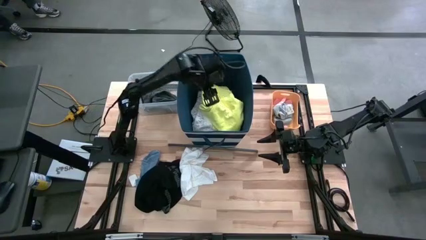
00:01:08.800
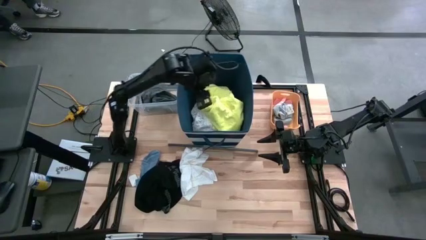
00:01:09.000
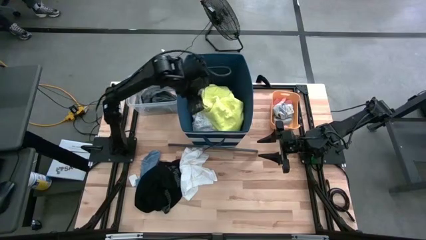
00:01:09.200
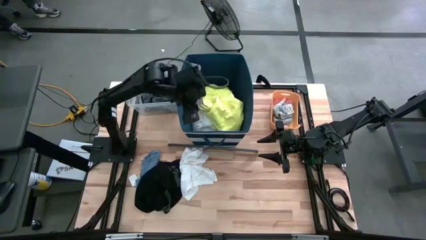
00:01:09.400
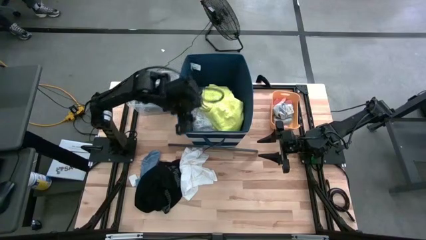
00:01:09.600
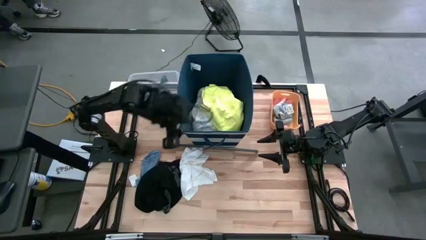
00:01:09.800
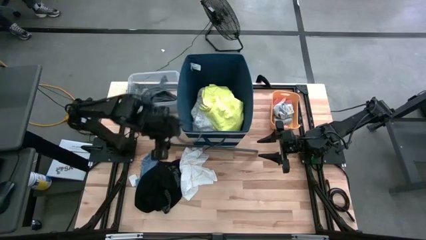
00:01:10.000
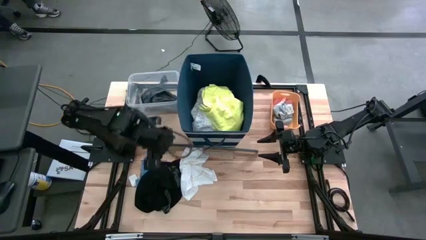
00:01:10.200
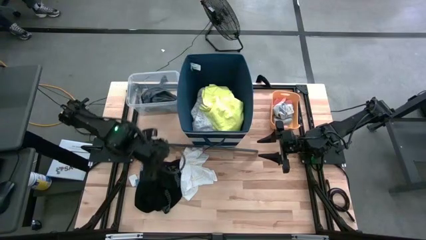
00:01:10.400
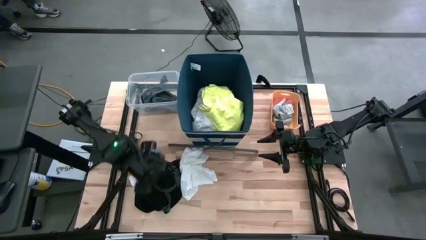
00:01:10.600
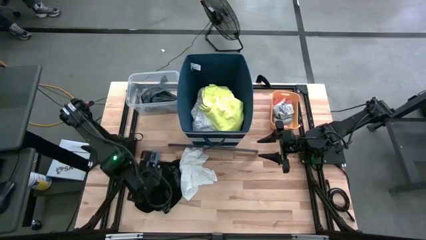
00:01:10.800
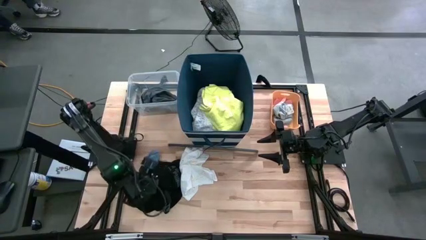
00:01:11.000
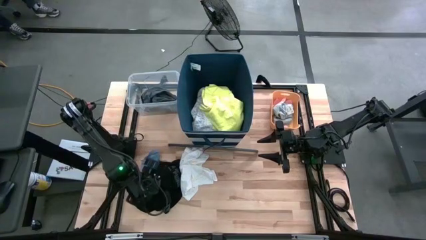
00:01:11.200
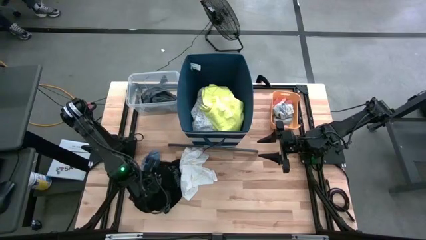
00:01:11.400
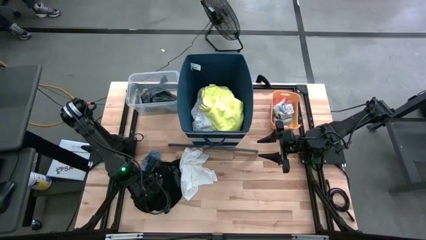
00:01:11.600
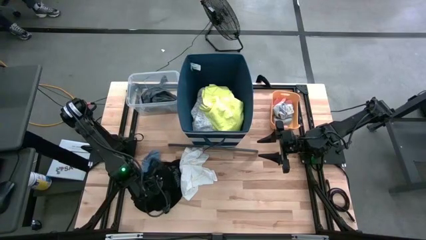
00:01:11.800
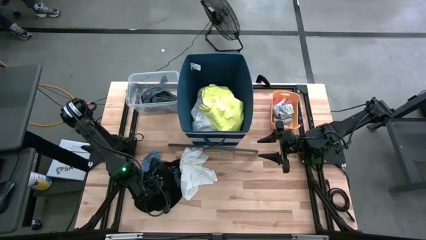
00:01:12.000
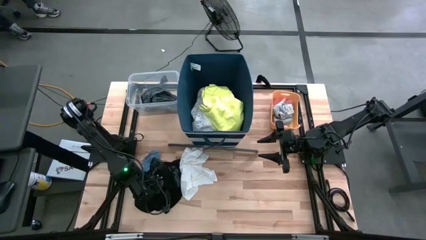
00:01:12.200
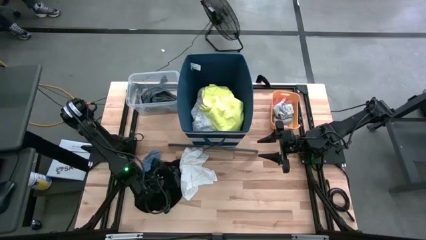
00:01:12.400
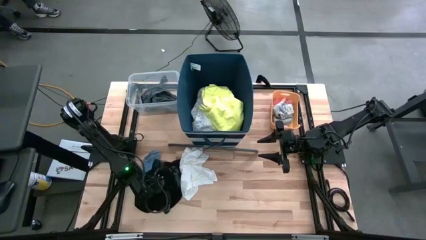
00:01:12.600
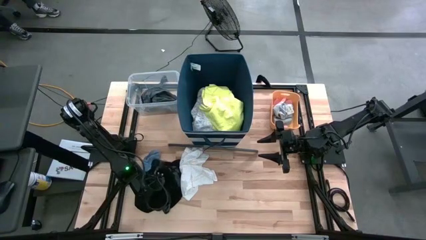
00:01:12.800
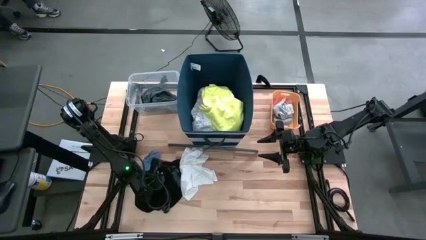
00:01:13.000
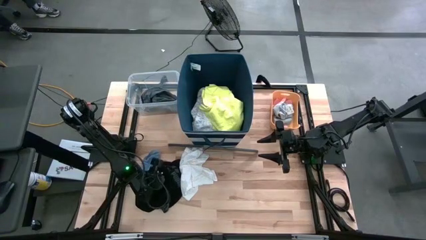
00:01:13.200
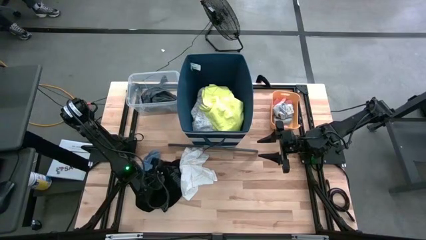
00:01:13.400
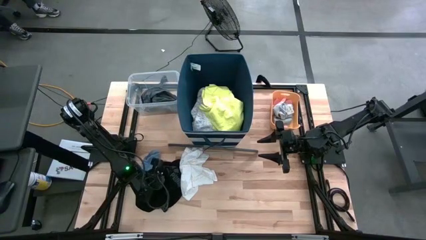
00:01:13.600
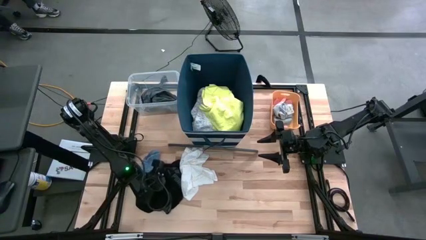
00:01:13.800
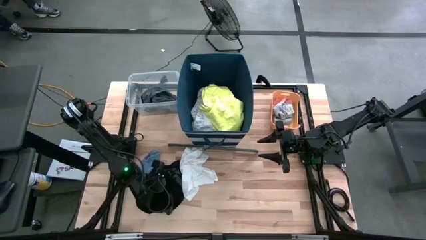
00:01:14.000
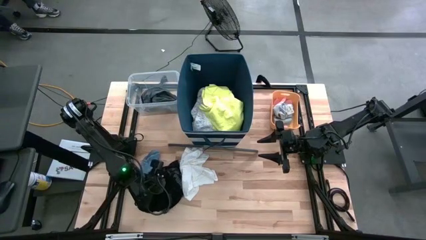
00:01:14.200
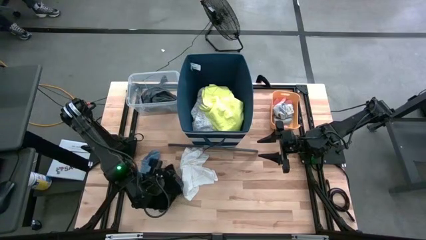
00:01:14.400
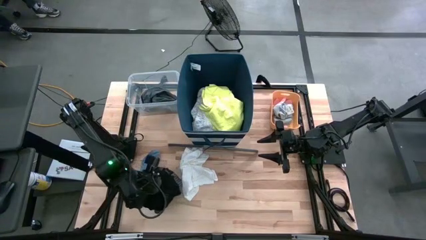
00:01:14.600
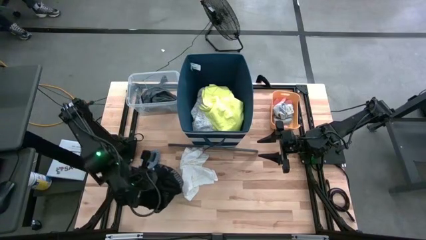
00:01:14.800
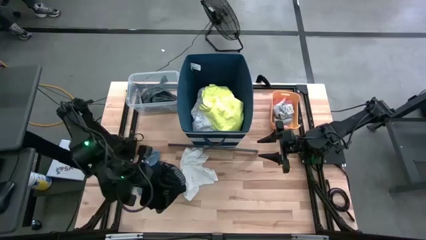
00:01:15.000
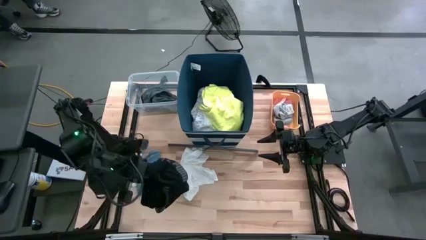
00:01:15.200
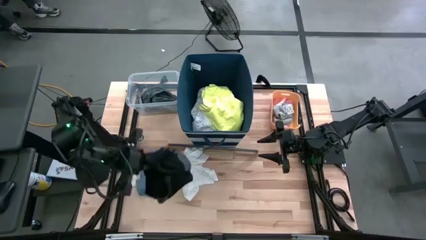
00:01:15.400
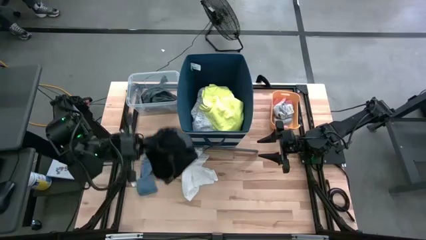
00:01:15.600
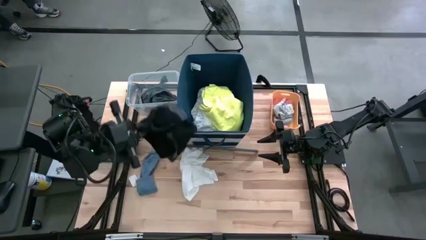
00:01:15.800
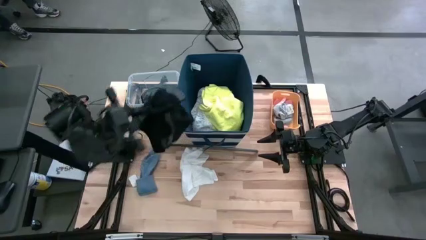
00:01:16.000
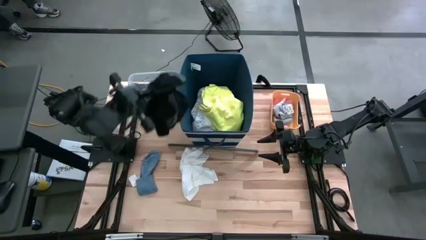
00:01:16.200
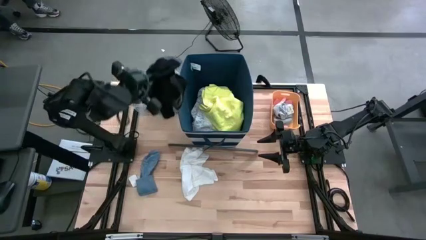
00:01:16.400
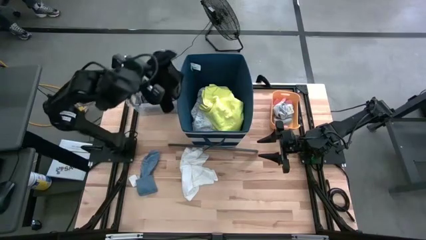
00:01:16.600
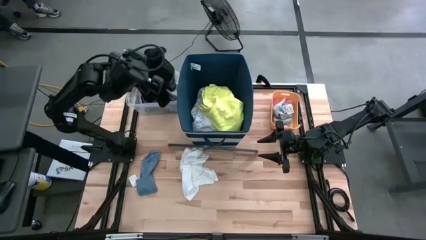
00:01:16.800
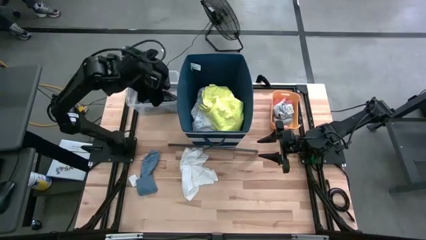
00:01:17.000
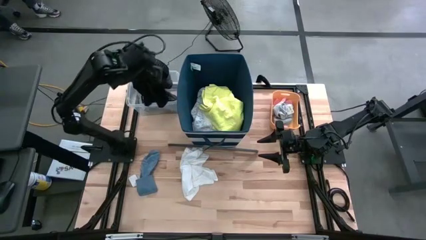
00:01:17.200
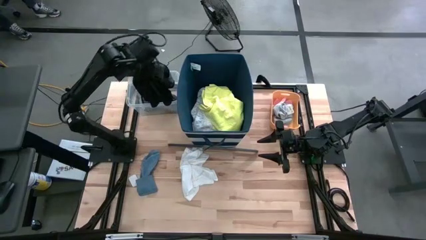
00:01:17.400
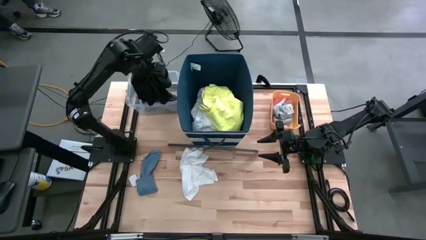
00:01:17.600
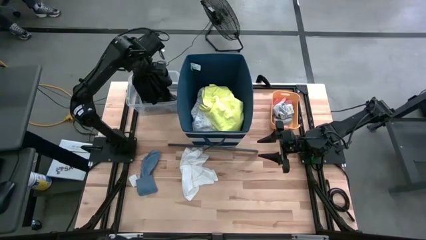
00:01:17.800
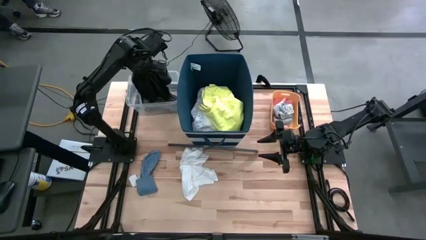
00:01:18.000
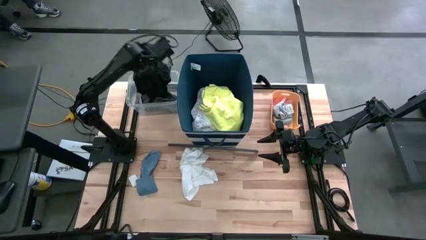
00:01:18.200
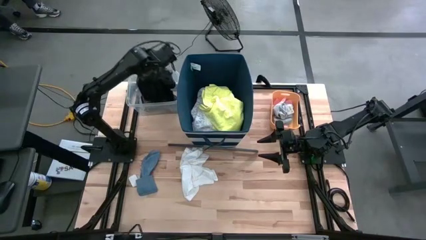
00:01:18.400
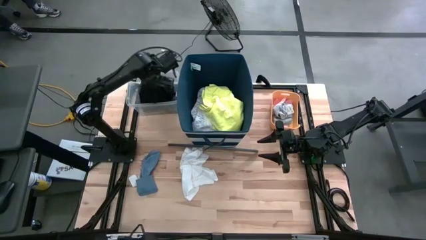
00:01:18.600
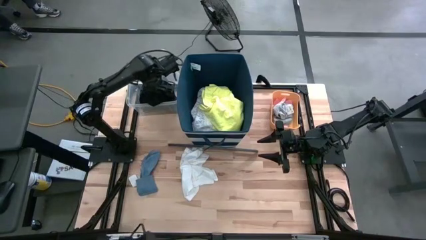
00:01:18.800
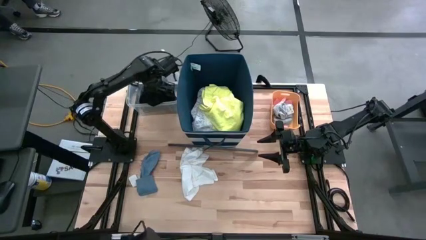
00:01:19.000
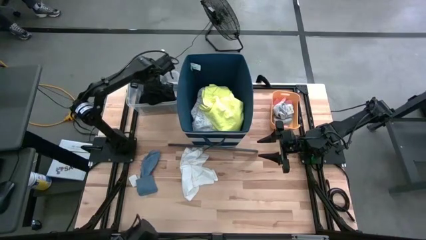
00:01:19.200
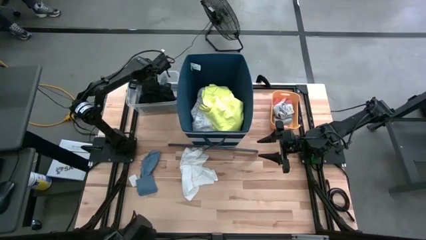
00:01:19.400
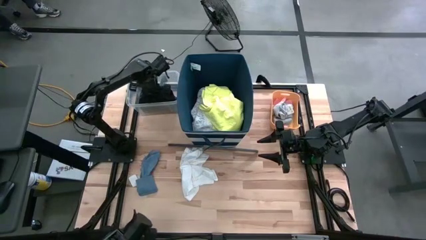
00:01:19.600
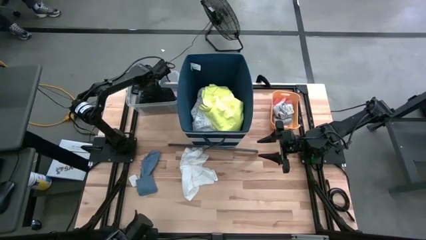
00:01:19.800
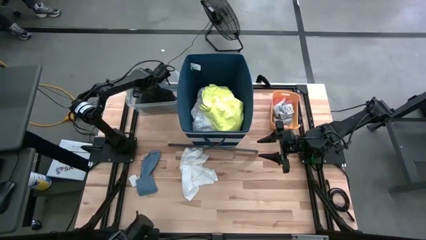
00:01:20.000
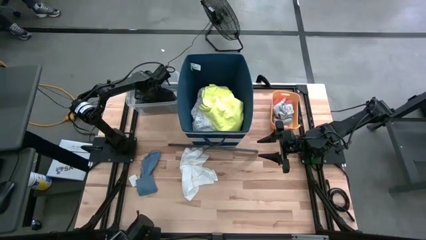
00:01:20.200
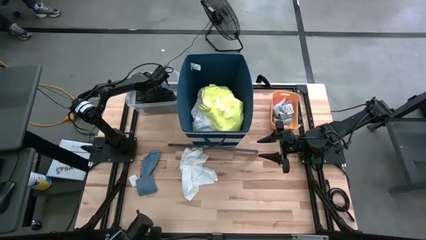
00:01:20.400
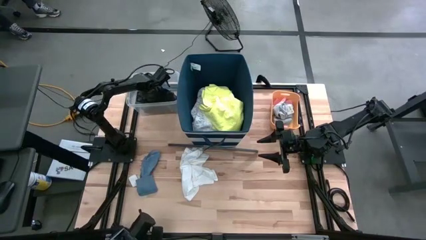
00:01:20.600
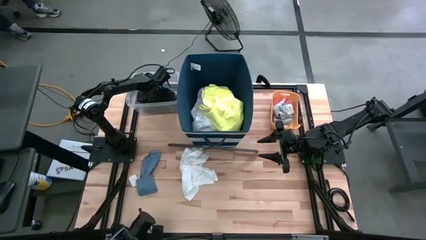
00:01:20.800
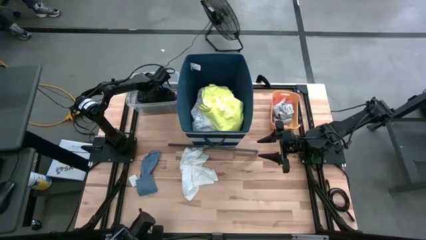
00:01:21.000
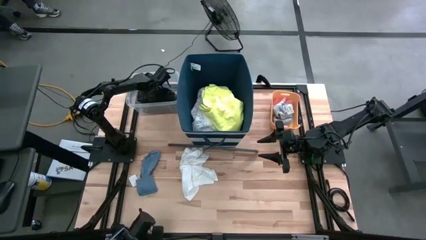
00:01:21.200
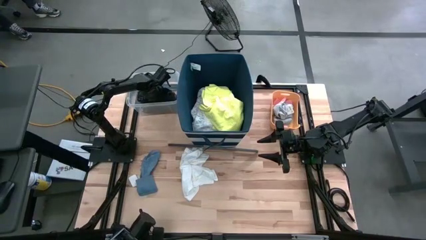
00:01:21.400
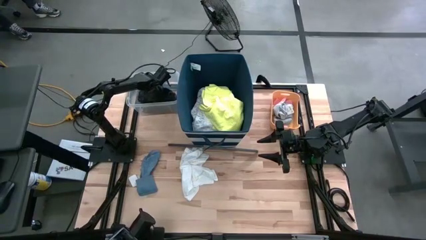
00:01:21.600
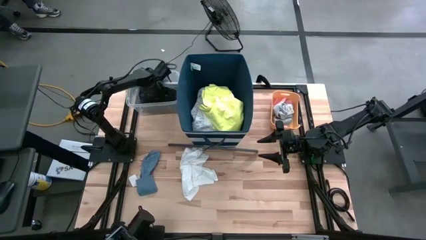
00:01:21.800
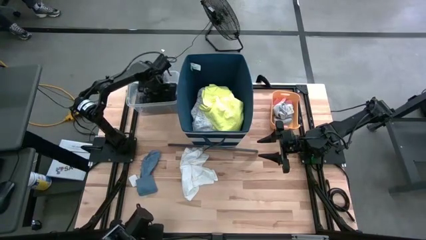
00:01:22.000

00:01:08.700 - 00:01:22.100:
Task: Pick & Place Cloths
Put the black boxer into the transparent container

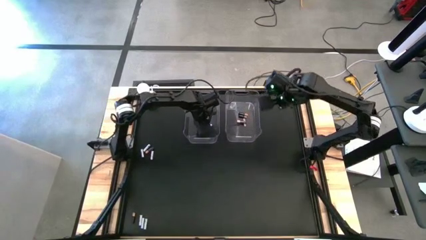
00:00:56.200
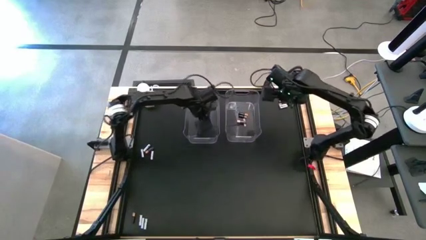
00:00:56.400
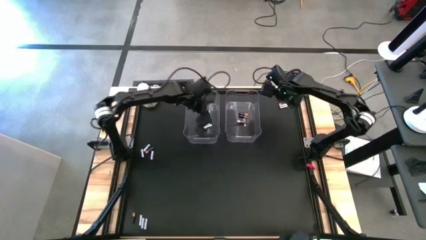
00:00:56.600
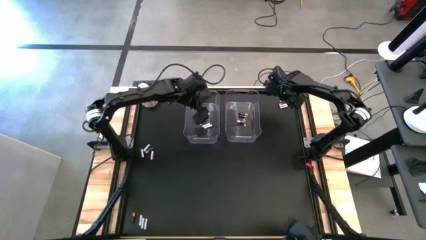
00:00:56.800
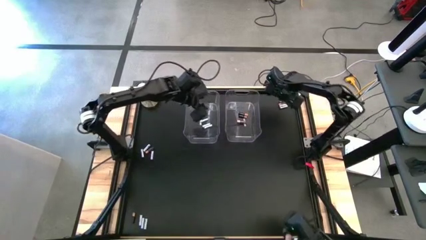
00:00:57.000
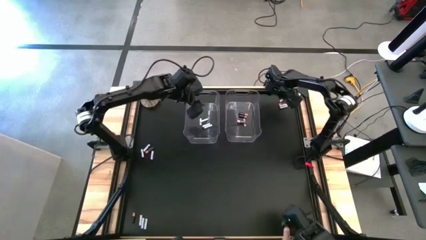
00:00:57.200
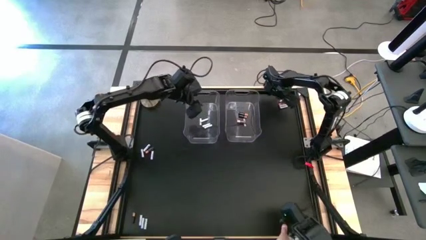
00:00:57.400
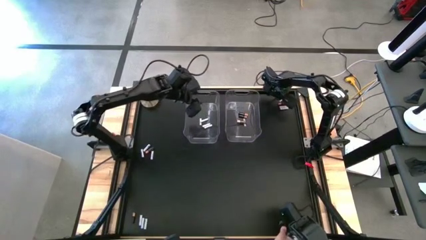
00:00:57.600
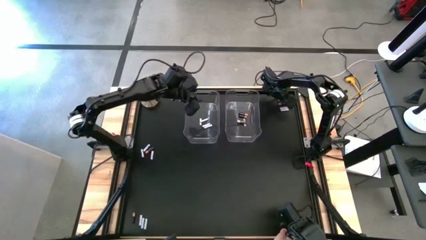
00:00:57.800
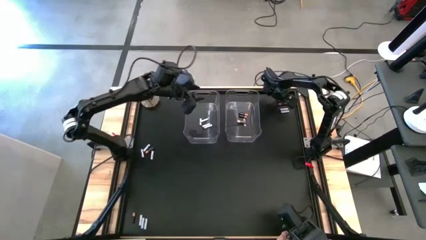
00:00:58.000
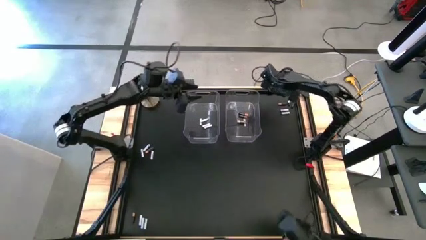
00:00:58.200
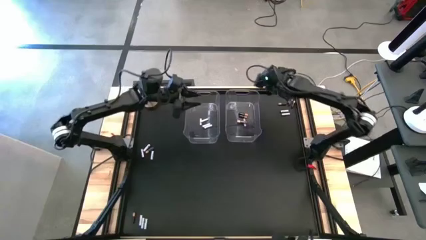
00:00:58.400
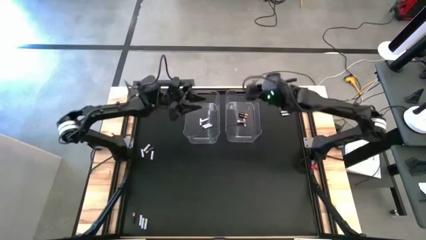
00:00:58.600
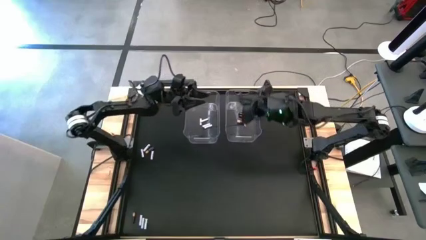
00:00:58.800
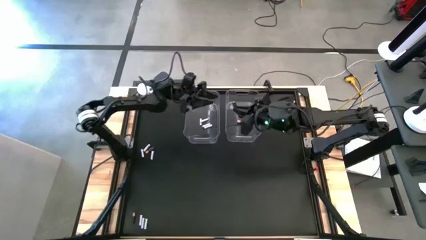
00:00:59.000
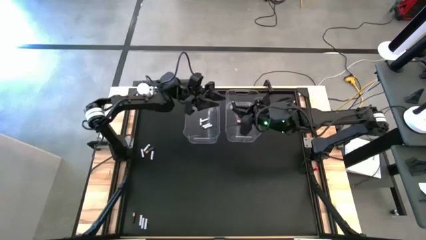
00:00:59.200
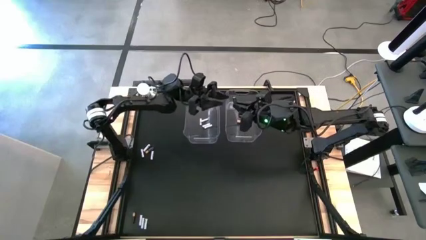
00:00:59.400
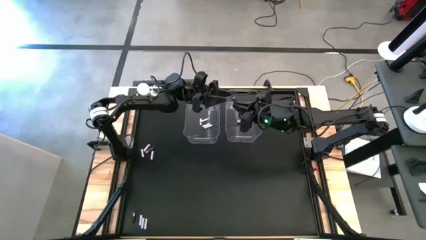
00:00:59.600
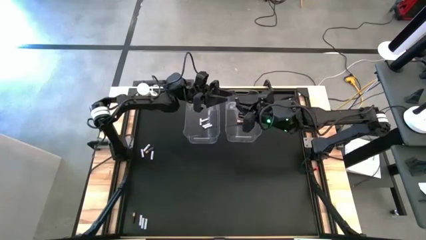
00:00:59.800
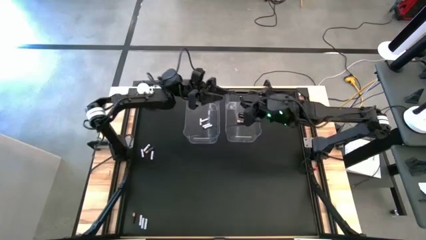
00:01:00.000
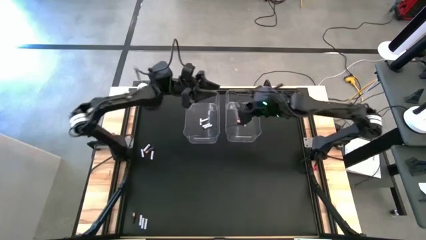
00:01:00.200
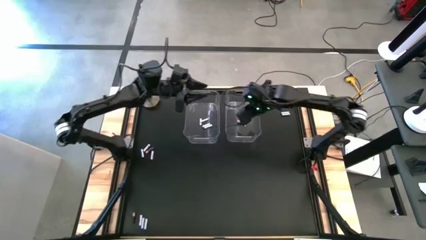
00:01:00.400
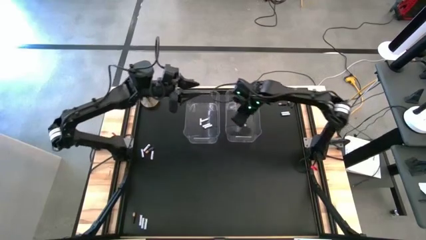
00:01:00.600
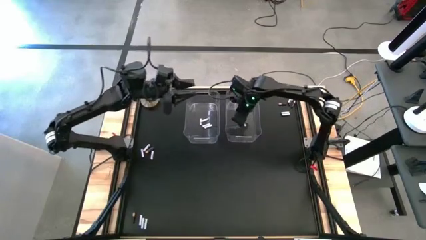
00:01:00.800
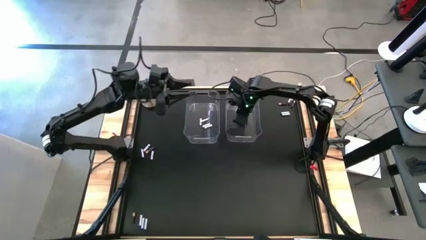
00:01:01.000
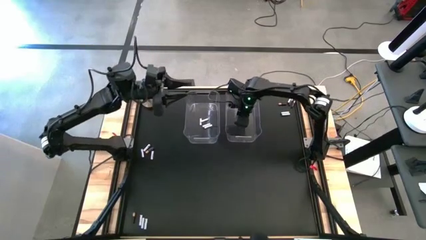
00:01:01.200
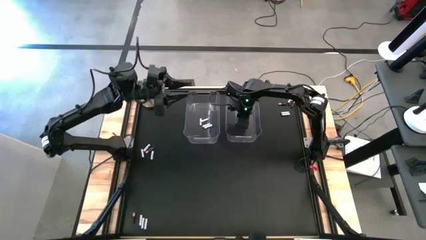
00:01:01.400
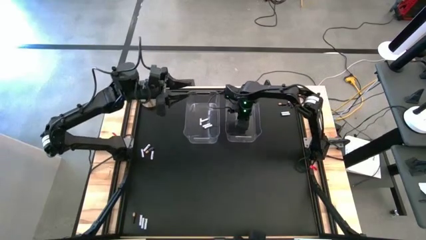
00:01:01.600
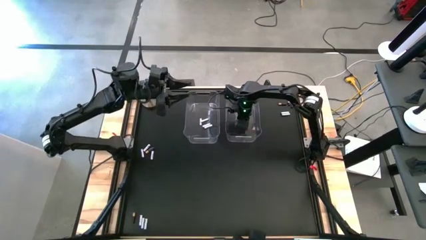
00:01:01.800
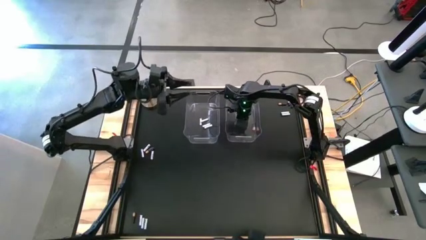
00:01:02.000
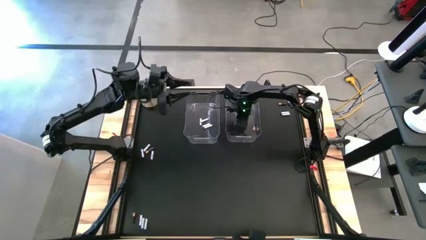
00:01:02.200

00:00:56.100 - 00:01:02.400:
Task: Sort batteries
Put the brown battery into the right transparent bin
